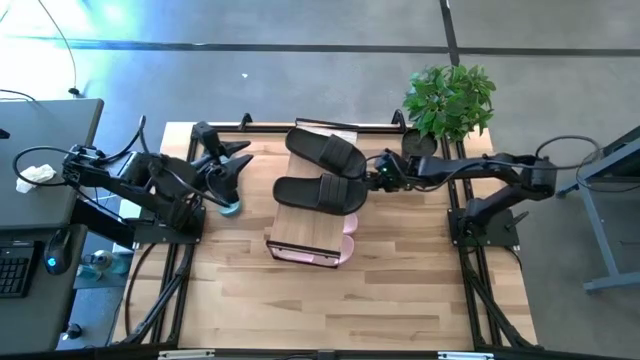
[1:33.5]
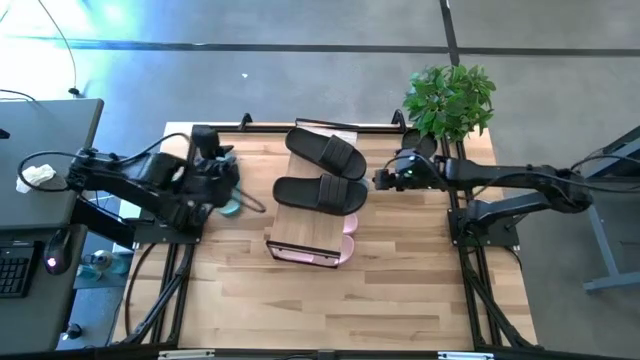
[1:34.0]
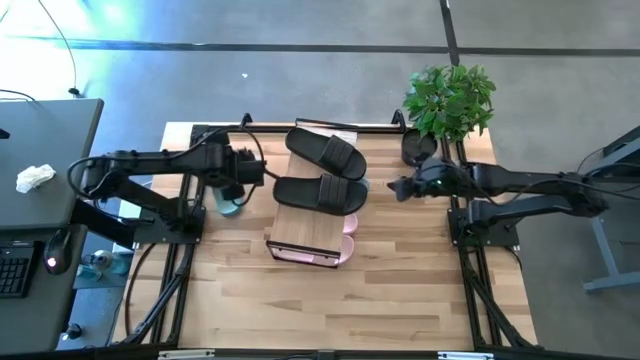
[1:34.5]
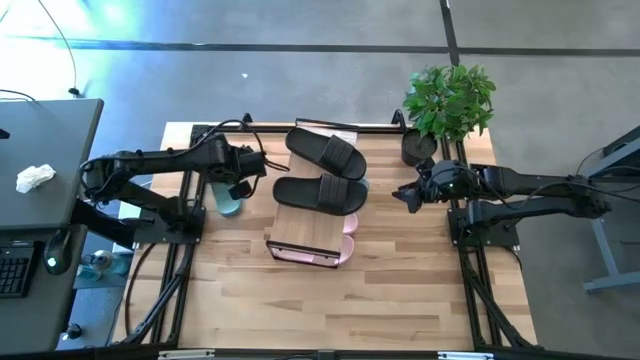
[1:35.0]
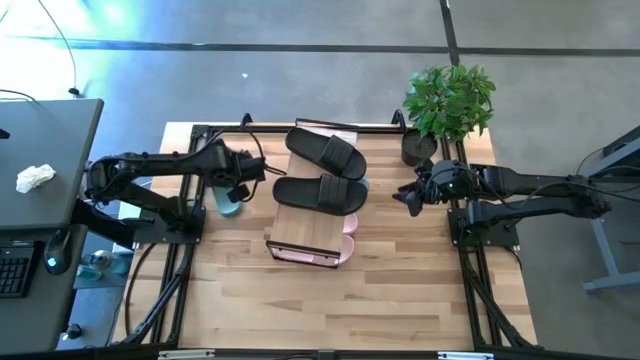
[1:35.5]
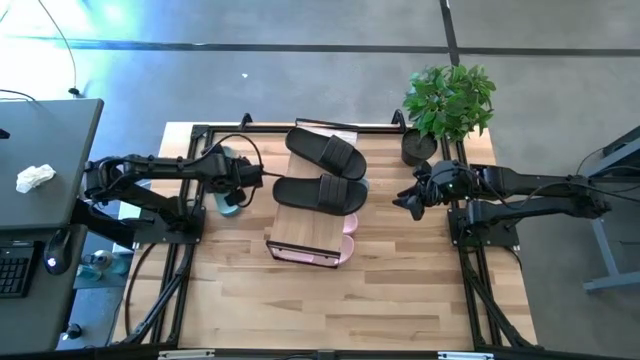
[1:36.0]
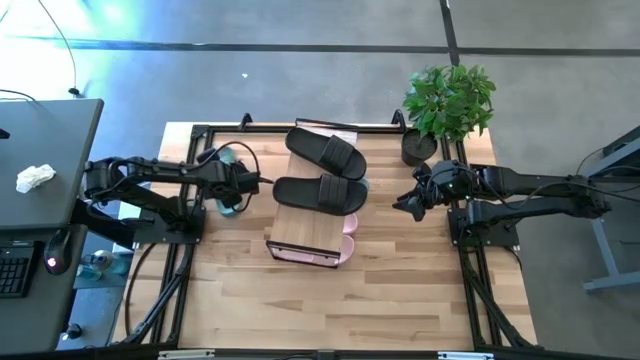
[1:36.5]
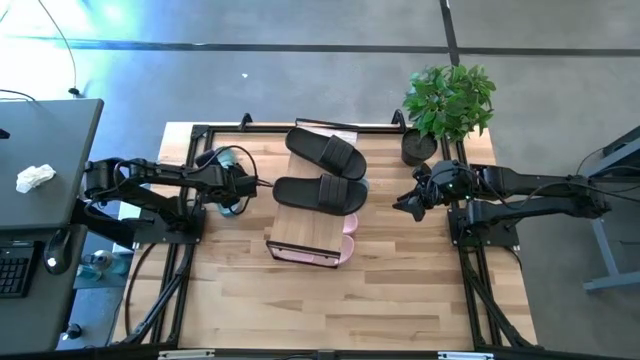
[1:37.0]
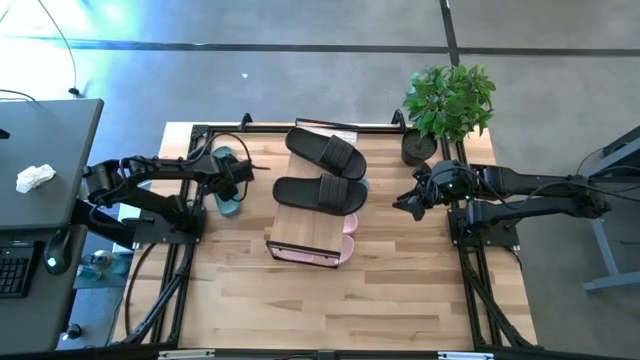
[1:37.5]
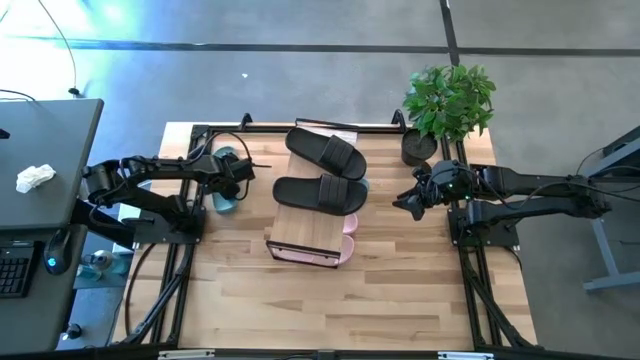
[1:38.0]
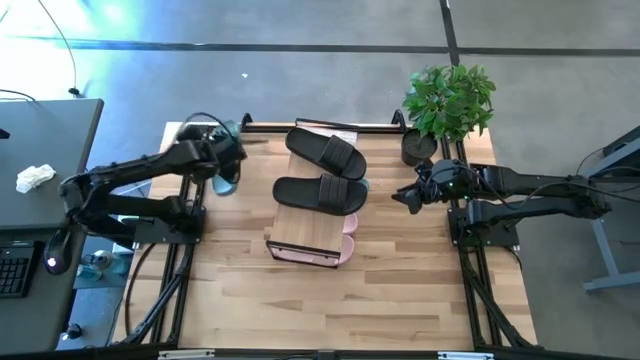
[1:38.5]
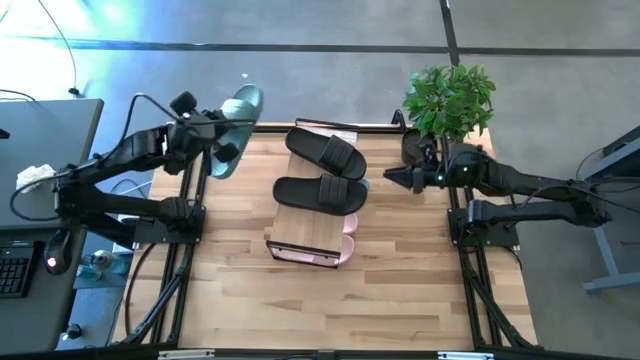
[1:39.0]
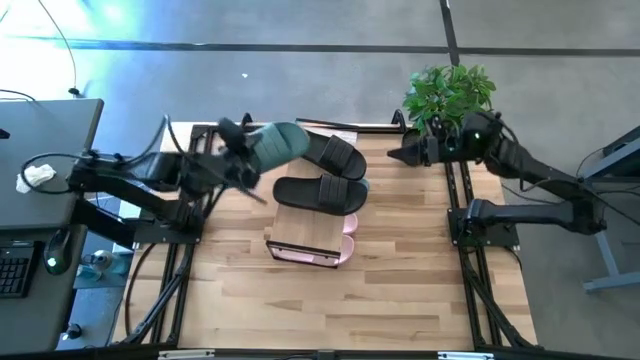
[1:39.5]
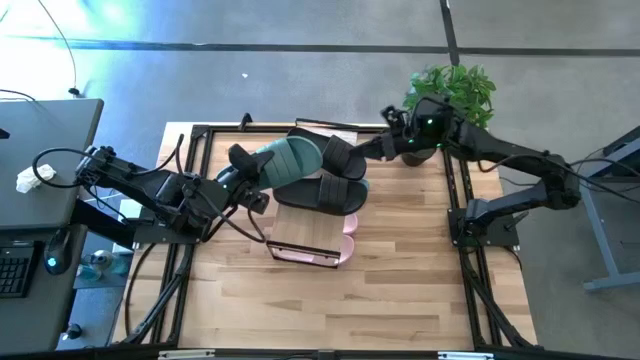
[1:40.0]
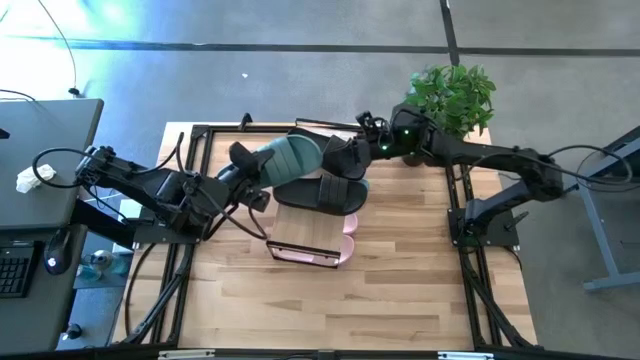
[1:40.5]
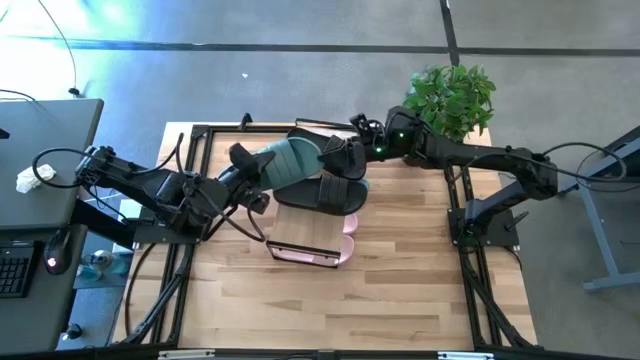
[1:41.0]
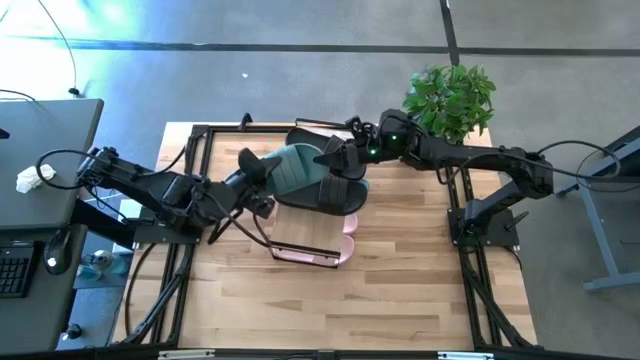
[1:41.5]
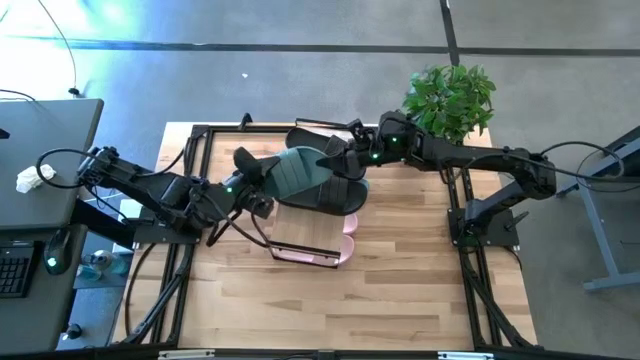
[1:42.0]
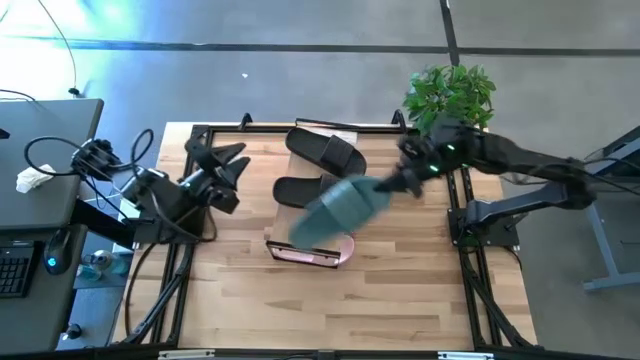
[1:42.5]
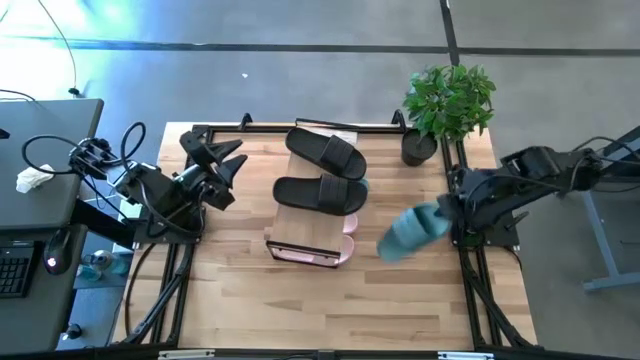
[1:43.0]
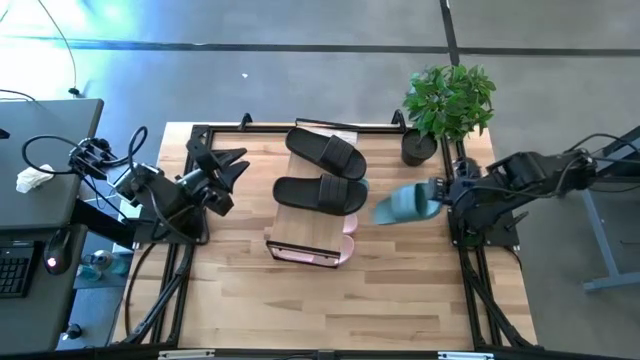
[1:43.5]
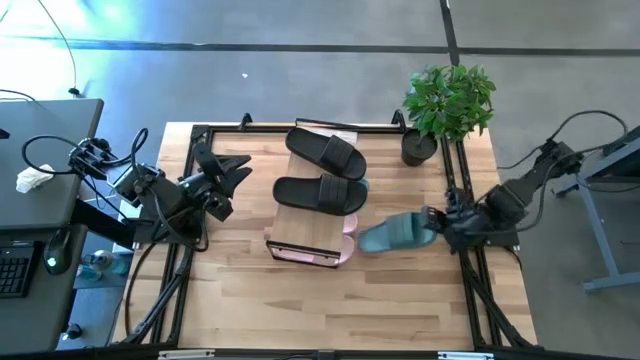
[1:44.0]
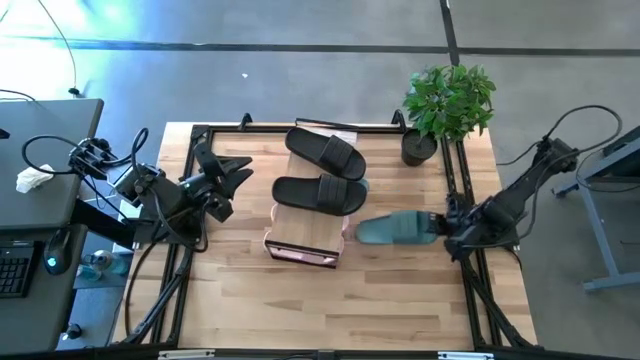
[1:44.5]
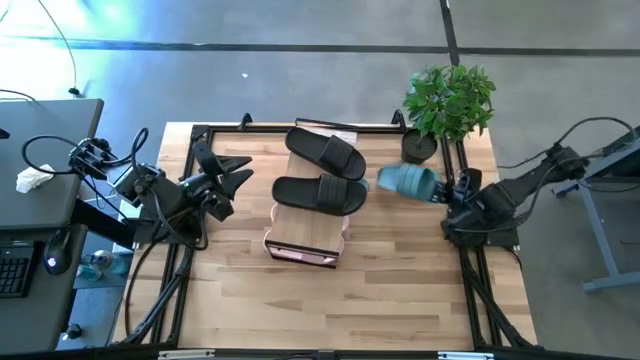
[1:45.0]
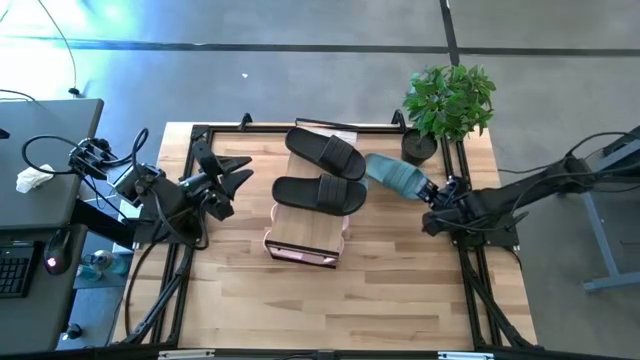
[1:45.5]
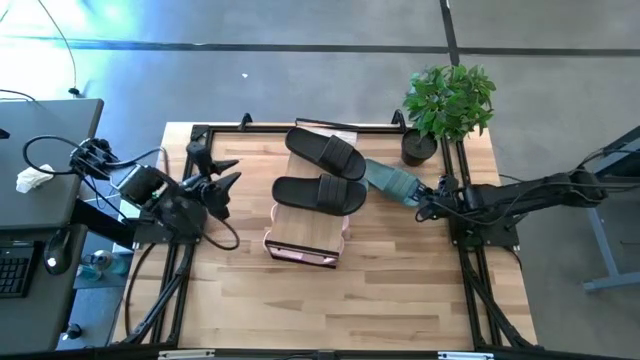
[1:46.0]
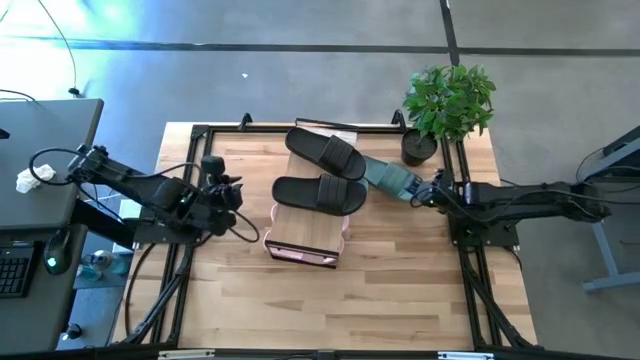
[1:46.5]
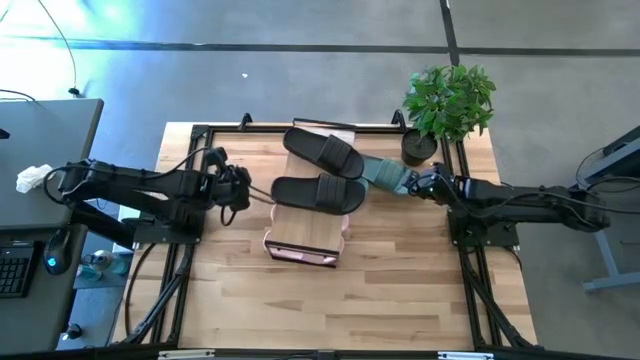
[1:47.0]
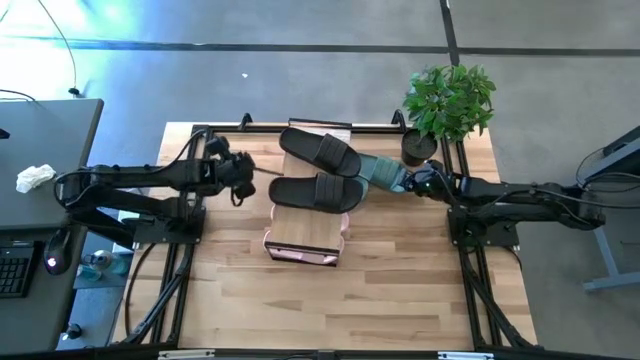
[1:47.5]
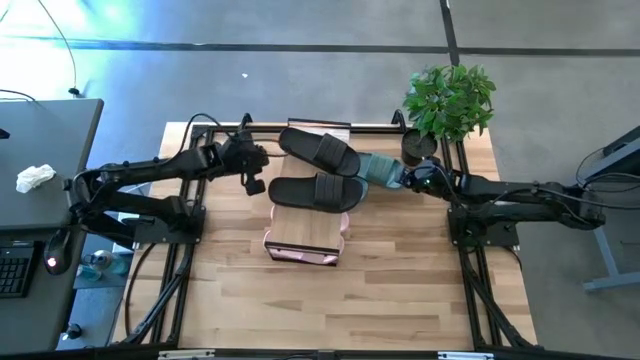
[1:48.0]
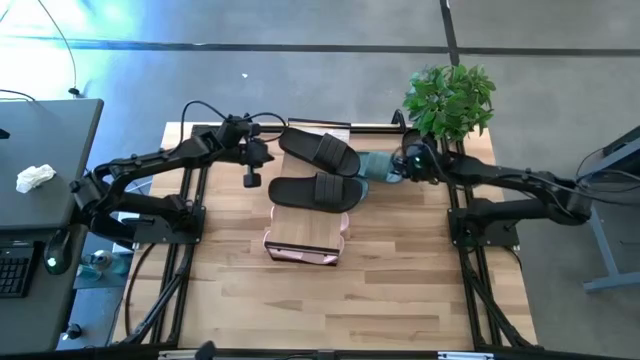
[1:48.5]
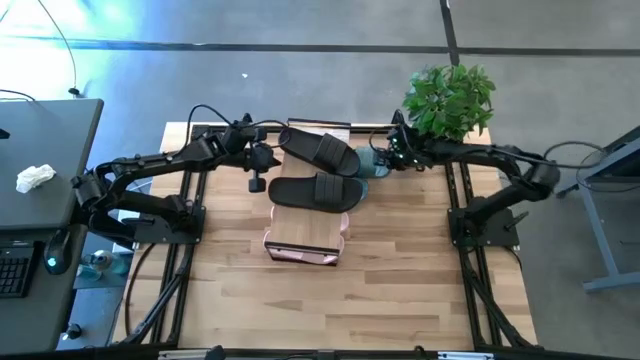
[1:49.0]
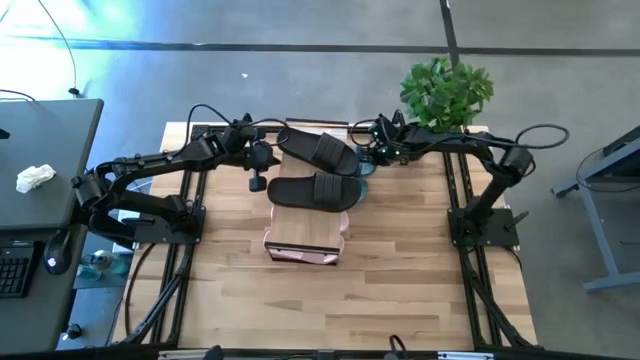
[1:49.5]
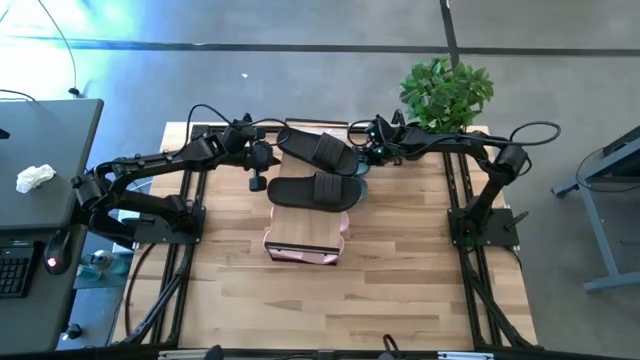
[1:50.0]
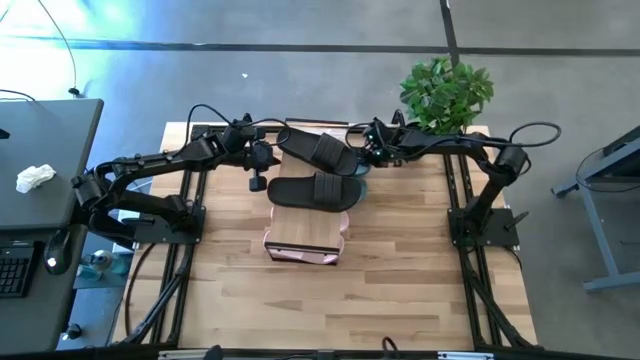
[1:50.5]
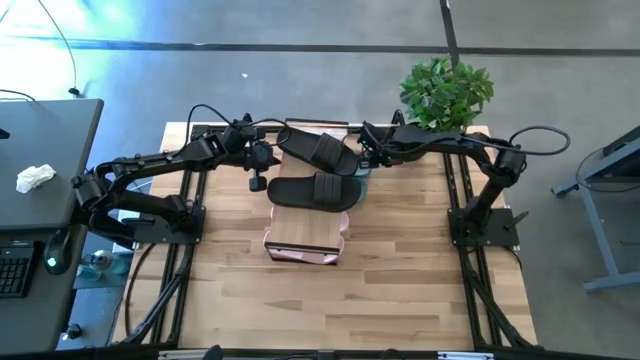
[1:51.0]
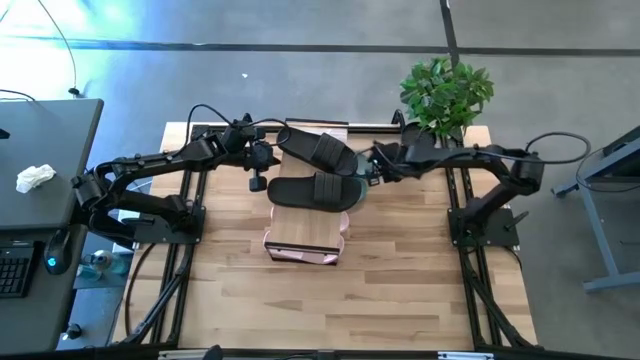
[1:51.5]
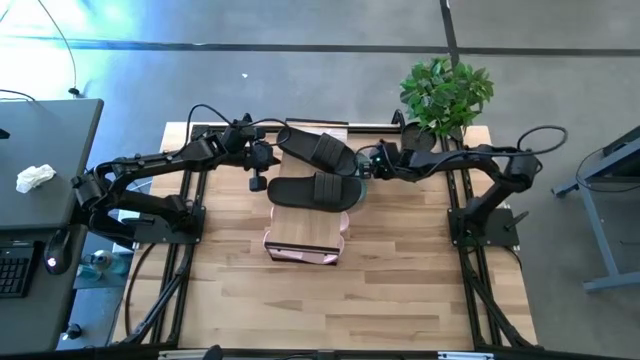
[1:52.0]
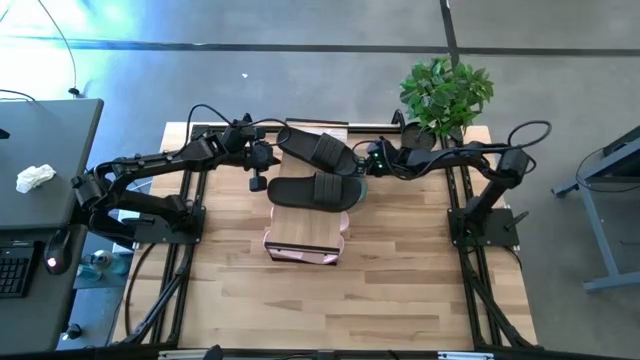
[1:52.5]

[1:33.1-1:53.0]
Task: Pick and place slides into the shelf
Put the green slide under the shelf

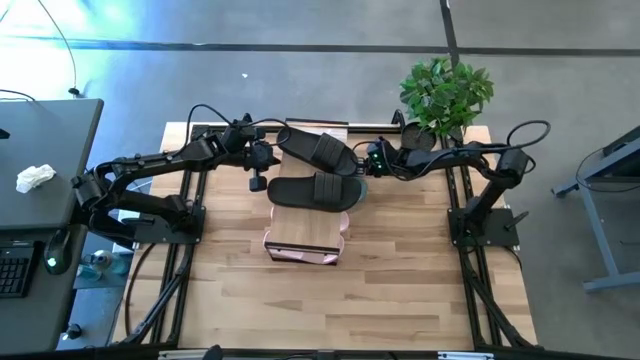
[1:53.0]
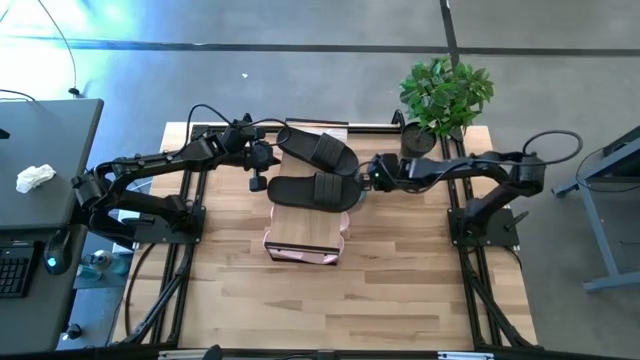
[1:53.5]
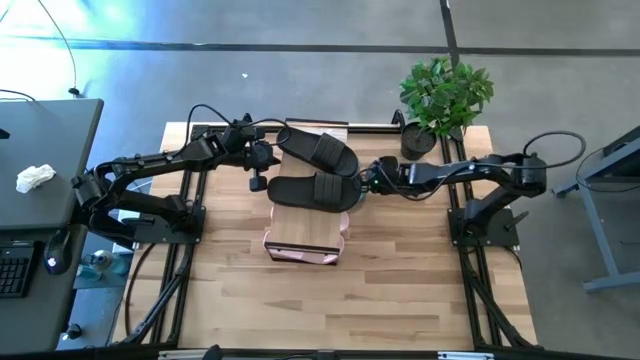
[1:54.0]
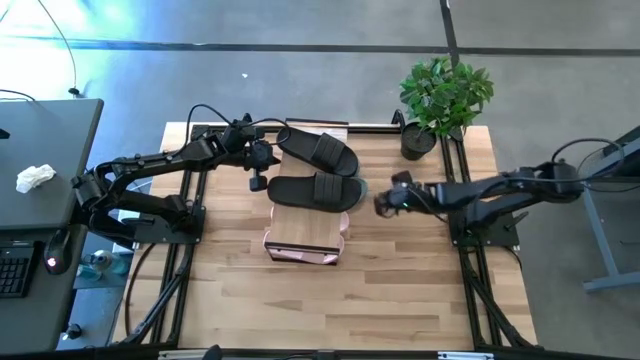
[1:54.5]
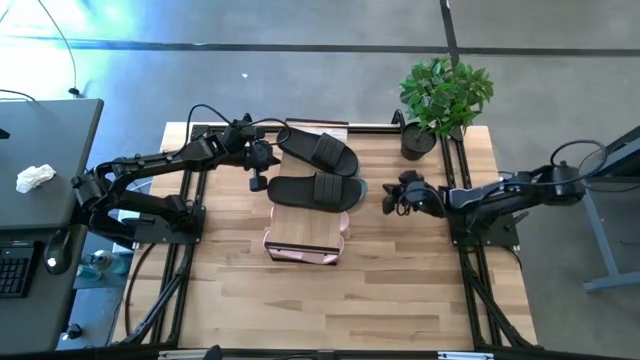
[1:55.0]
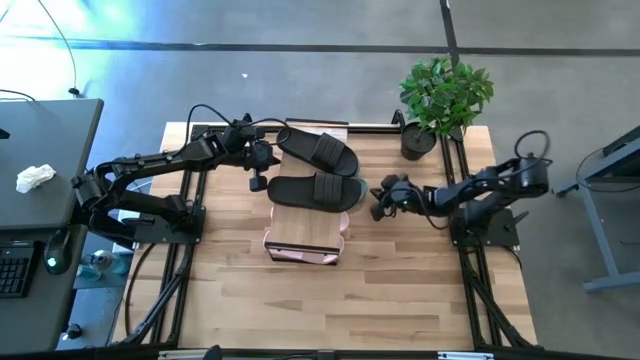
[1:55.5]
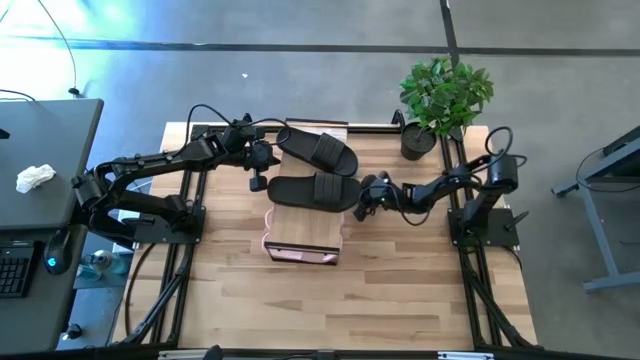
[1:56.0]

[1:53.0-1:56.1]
Adjust the bottom green slide under the shelf
